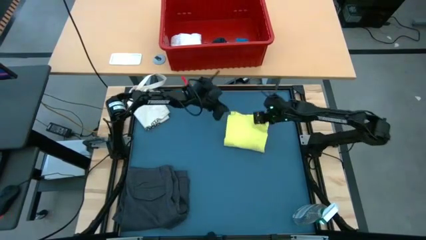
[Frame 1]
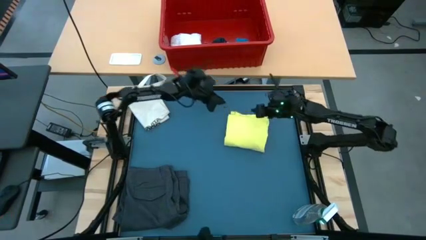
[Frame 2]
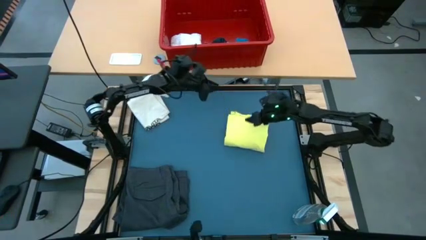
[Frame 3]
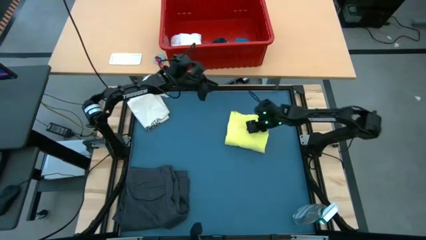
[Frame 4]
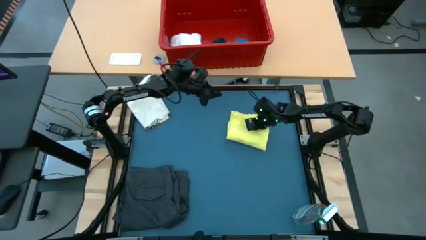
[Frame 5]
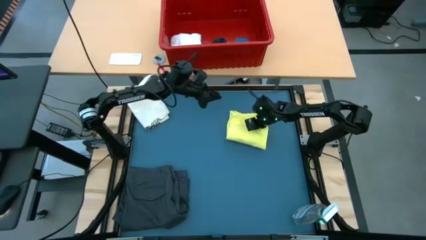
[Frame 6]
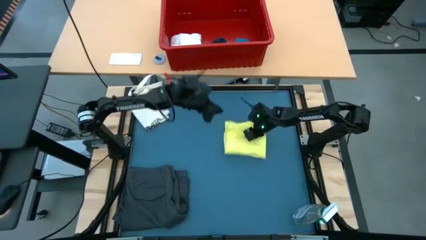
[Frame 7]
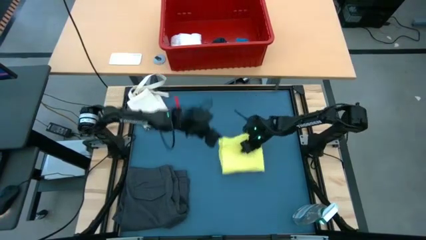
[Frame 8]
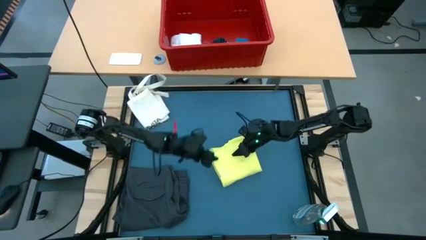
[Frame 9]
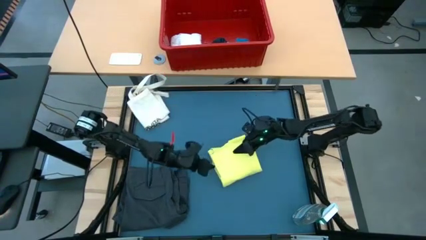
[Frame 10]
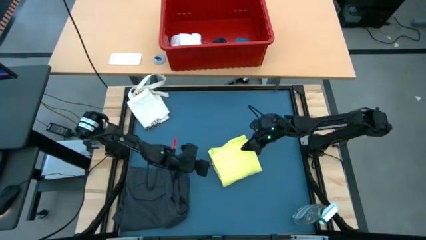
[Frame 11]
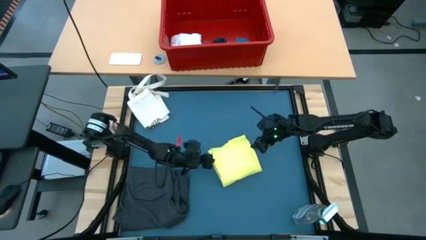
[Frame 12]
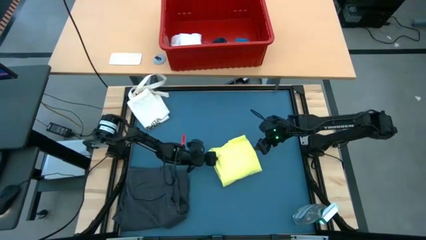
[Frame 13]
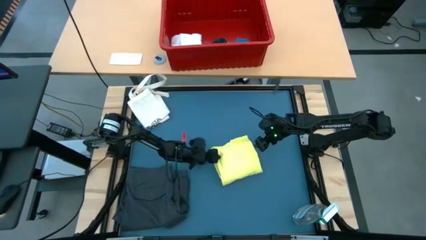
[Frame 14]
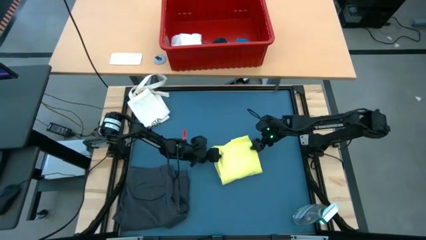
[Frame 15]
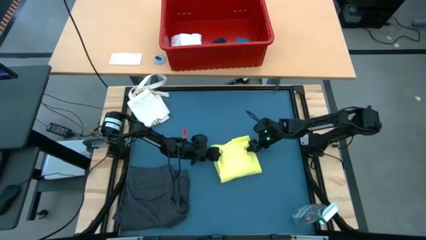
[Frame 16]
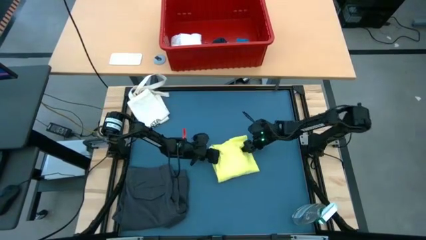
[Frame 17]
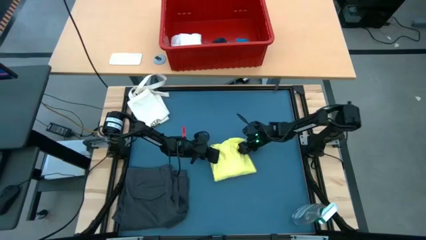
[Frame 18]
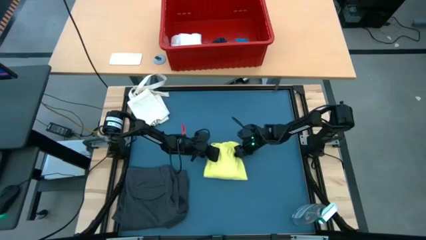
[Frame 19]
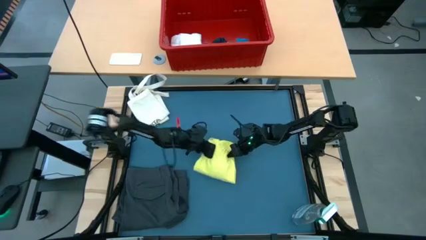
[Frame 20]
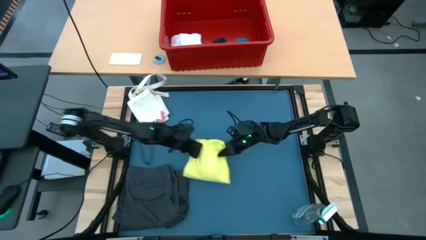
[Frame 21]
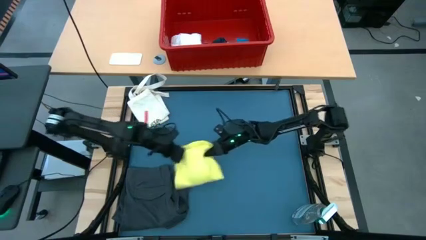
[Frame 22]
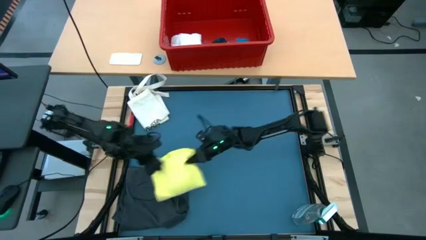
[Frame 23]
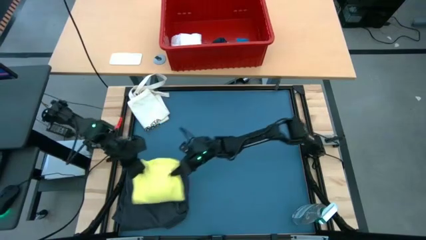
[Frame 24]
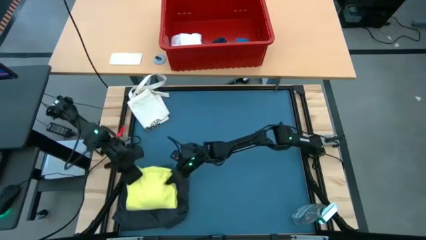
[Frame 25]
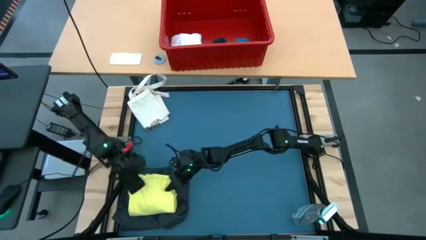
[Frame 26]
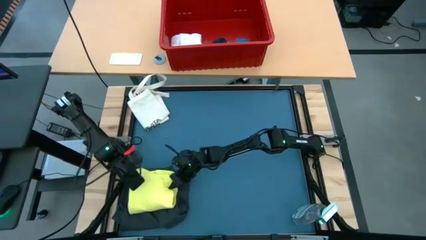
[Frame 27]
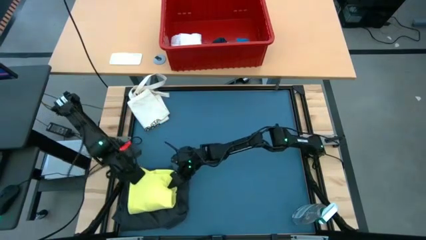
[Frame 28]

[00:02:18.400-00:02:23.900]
Task: Fold laundry
Stack the yellow shirt on top of the gray shorts

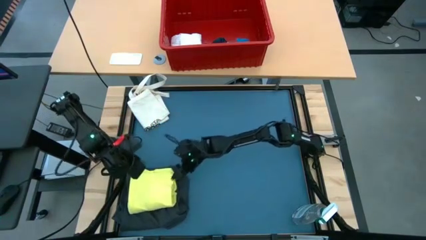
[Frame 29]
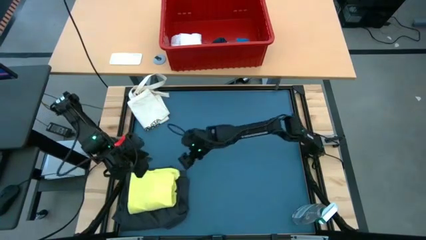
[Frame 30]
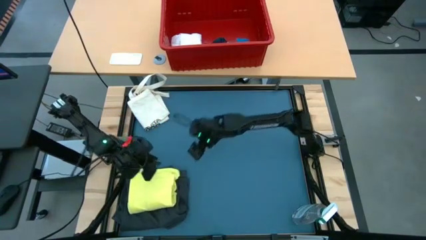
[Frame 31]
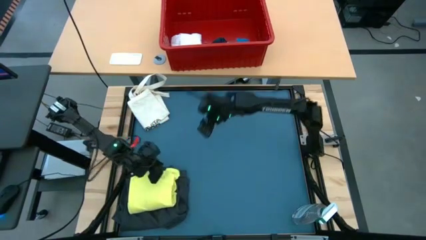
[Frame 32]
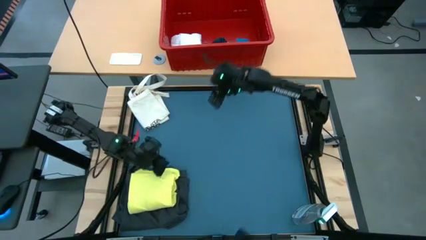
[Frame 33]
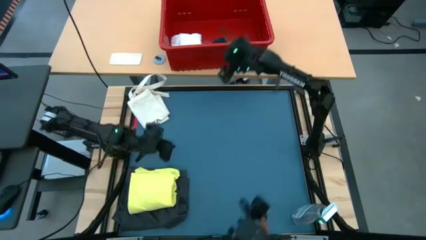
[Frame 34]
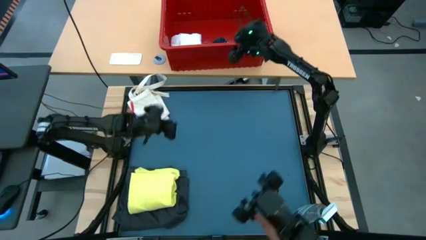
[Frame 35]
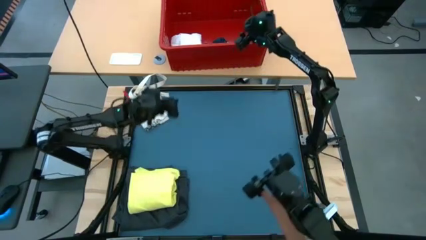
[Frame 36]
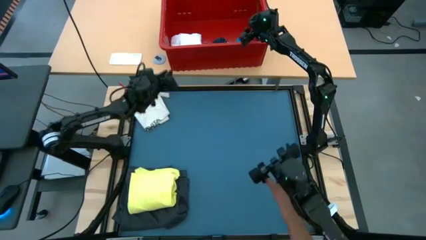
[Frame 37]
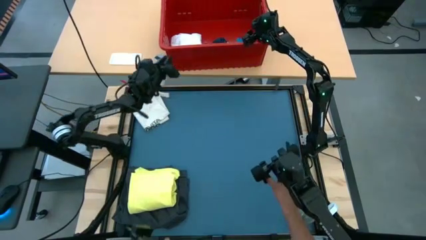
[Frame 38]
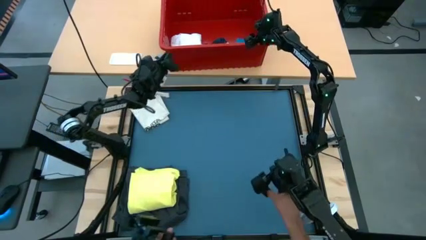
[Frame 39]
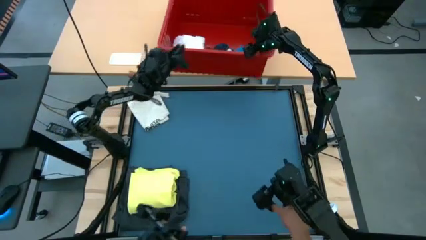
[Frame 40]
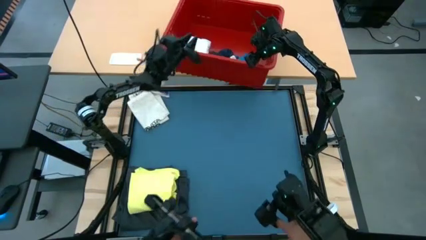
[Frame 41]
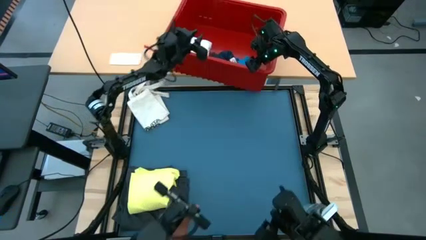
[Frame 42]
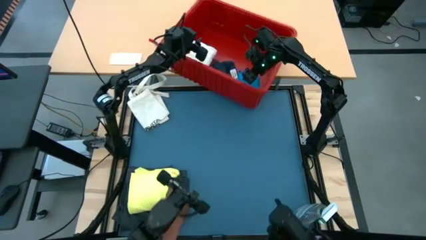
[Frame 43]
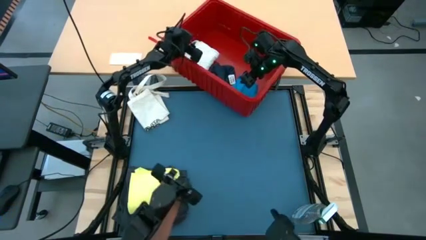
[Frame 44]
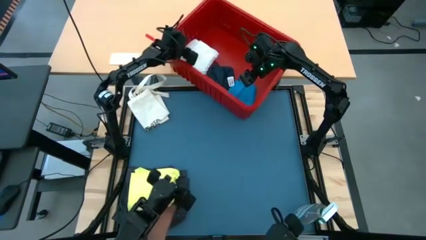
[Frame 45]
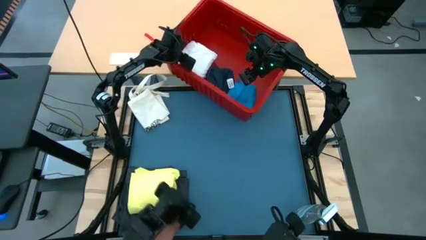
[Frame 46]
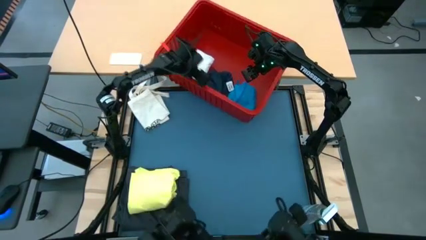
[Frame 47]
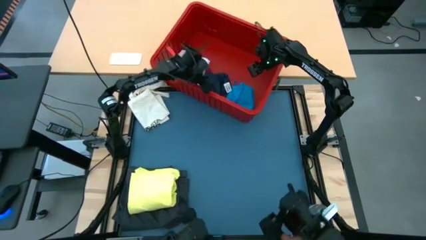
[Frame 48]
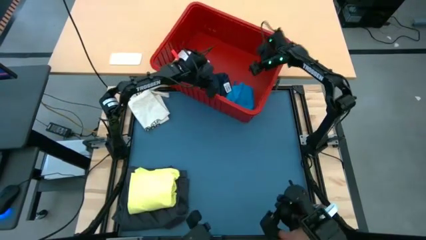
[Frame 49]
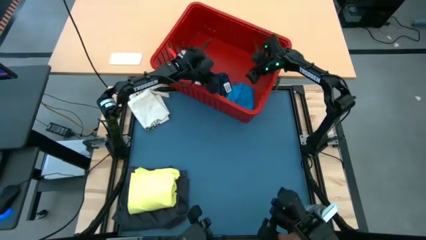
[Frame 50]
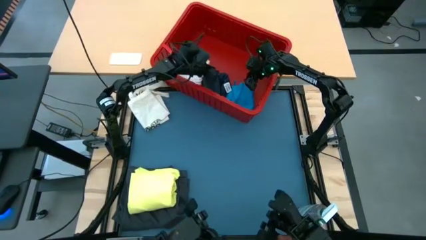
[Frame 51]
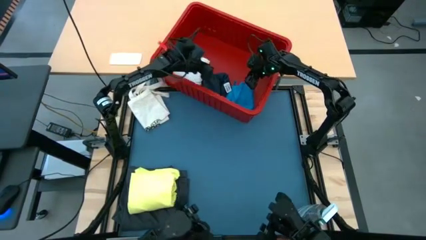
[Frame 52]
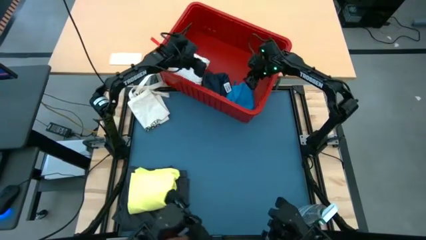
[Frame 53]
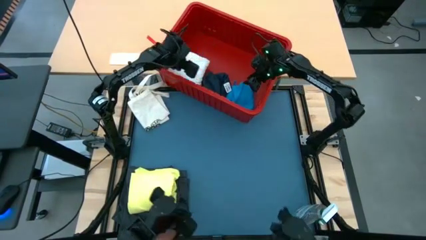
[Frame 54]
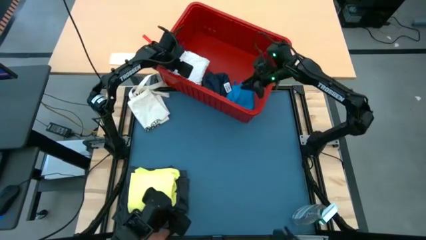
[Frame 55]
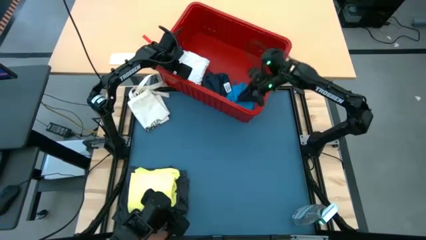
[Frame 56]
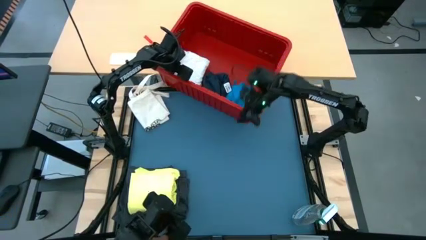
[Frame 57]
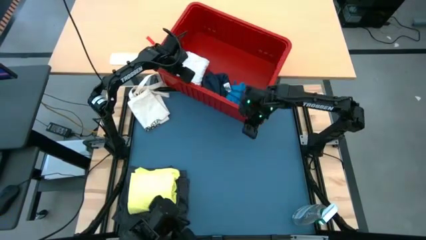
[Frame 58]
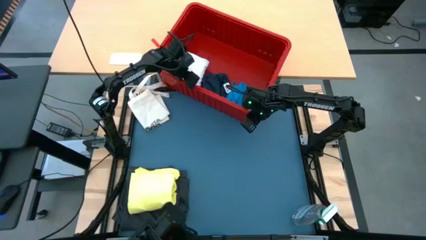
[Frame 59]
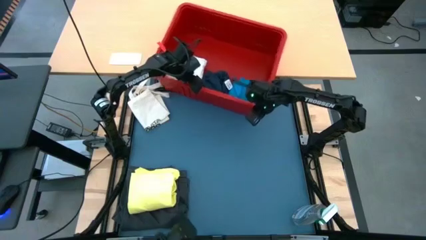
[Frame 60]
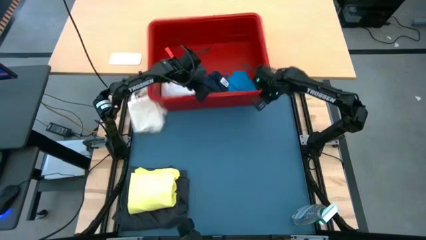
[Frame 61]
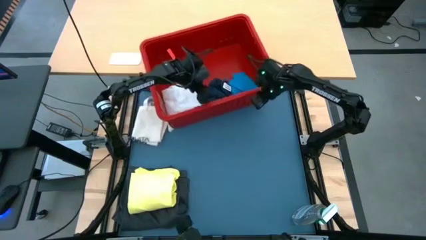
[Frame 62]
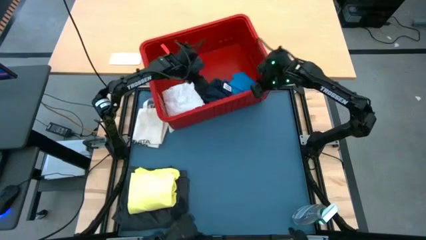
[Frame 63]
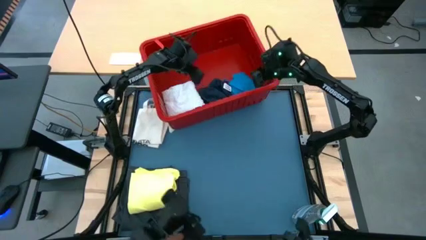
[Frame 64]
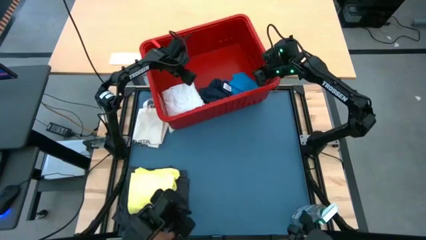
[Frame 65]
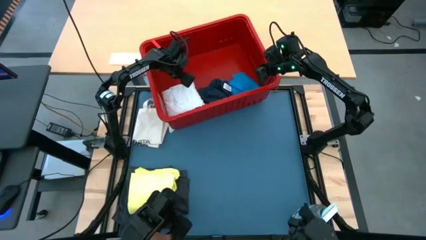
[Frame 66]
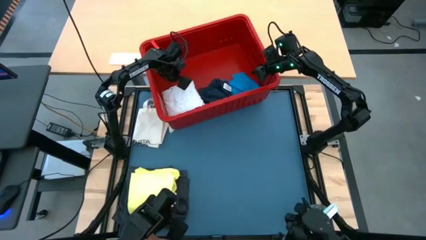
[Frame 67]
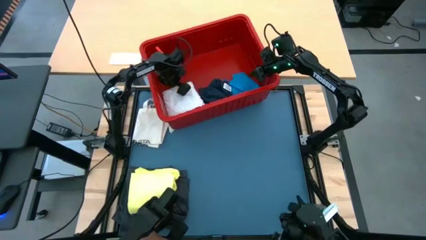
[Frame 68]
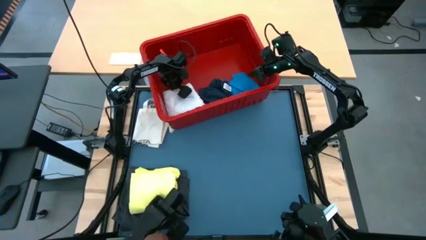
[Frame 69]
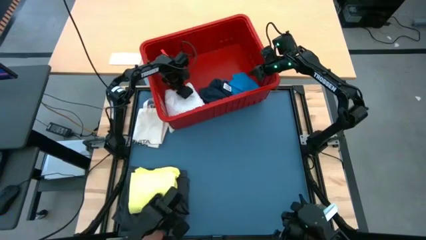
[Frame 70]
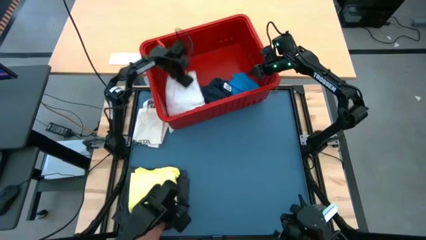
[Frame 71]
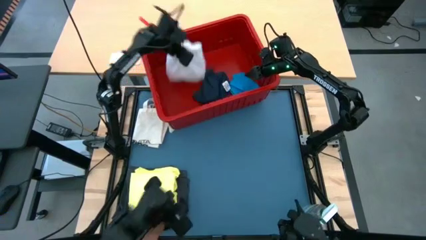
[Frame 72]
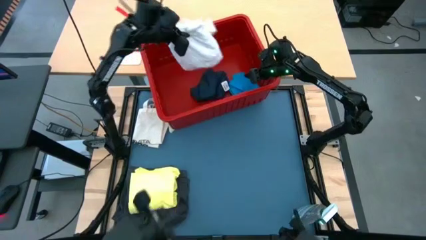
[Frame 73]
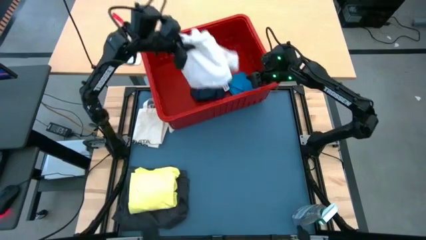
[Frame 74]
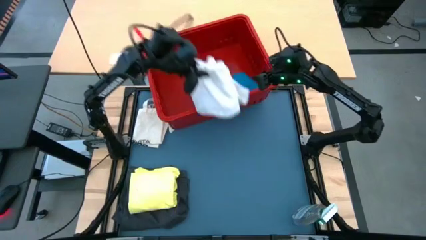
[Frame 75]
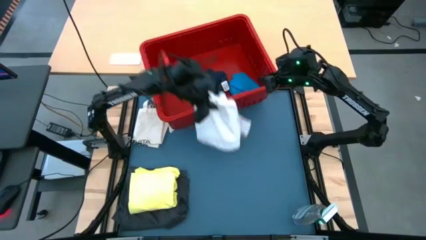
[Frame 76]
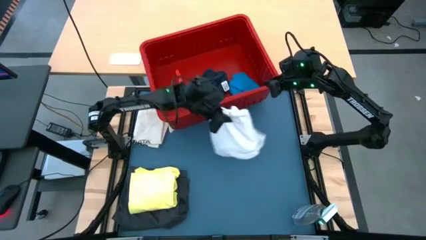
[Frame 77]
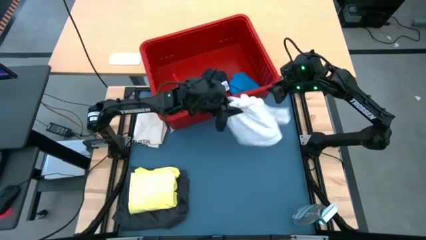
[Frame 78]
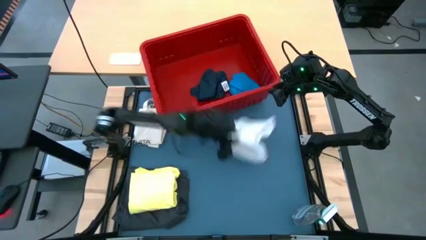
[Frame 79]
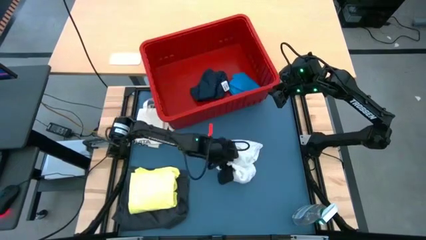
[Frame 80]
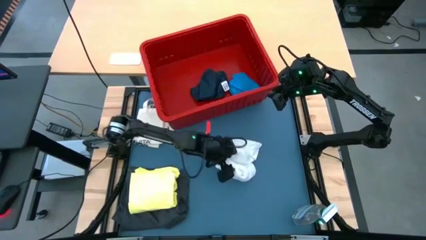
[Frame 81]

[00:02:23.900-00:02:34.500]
Remove the white blouse from the bin
